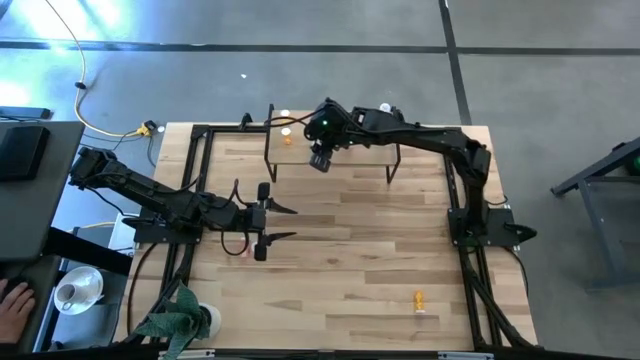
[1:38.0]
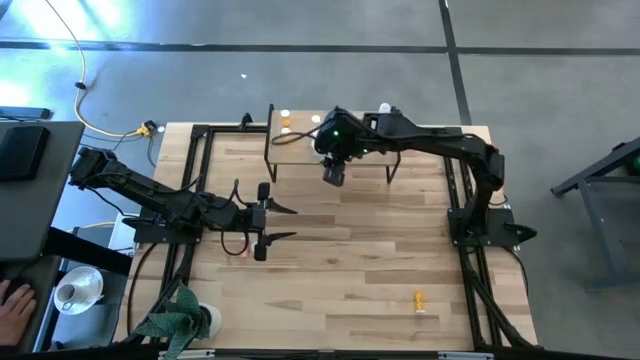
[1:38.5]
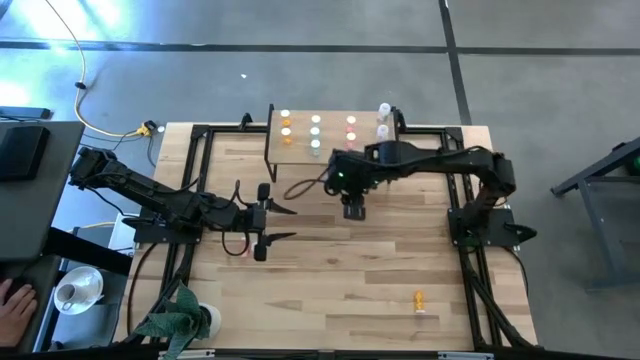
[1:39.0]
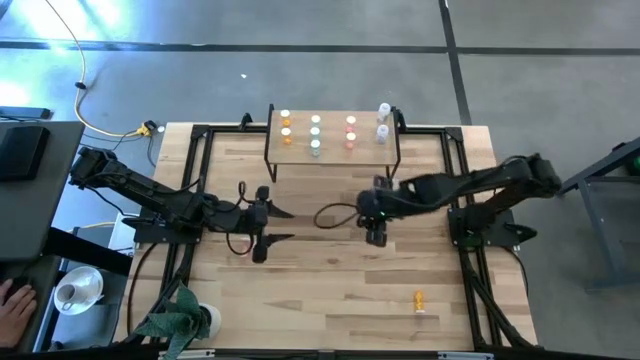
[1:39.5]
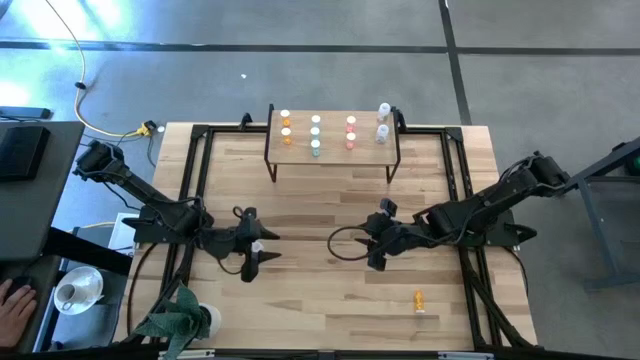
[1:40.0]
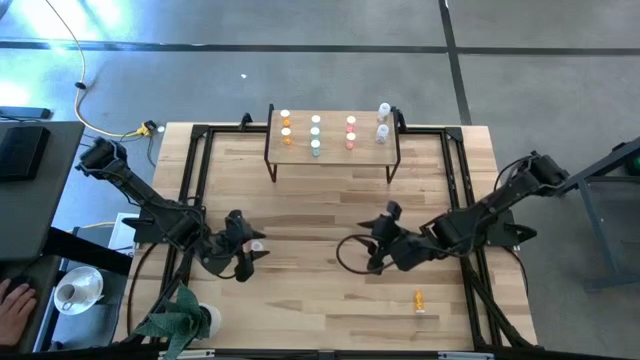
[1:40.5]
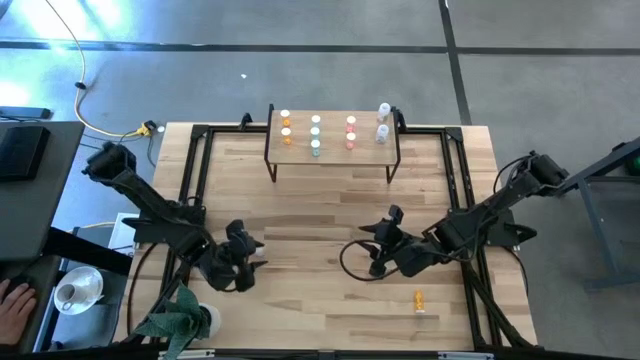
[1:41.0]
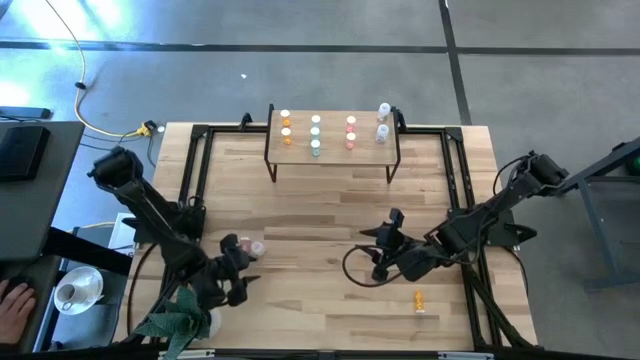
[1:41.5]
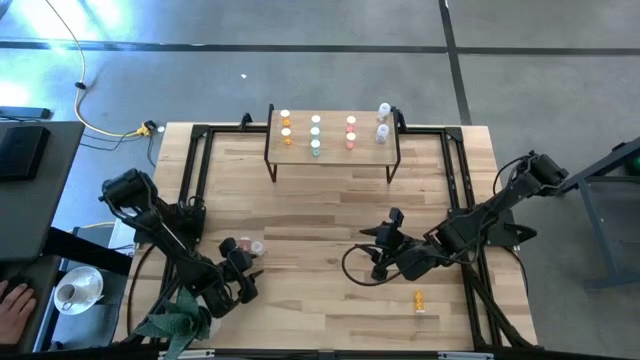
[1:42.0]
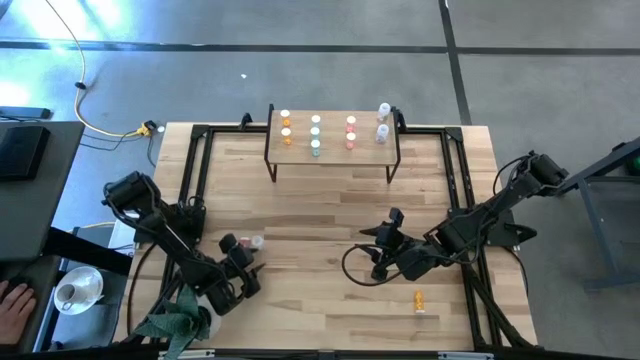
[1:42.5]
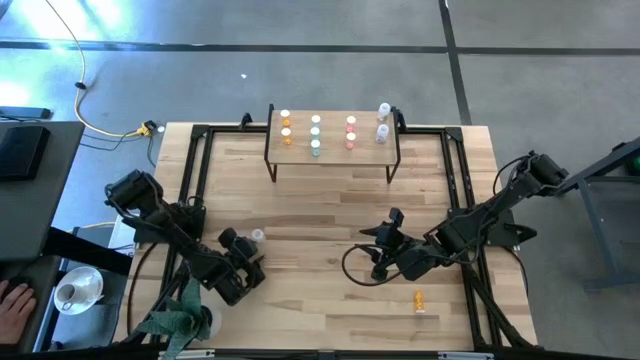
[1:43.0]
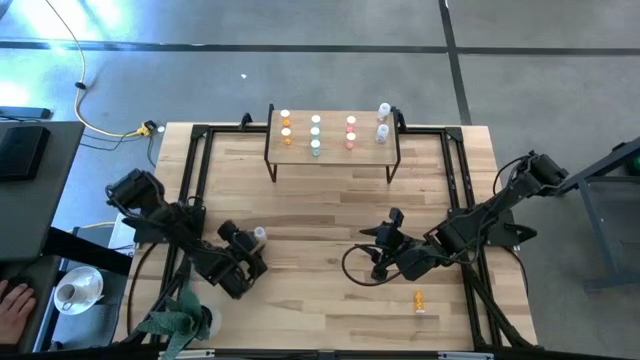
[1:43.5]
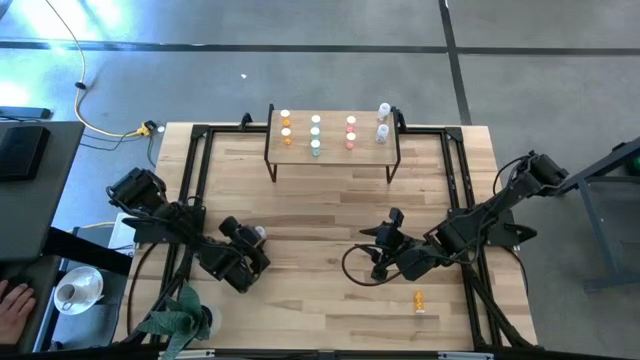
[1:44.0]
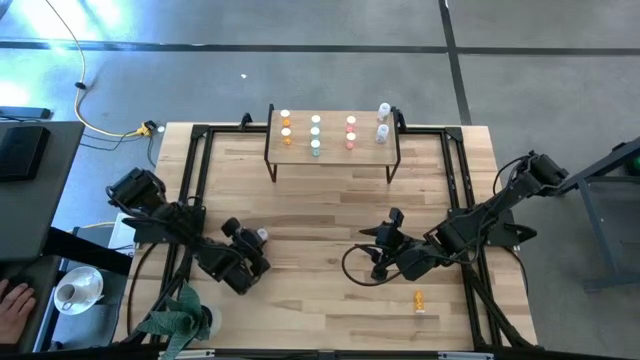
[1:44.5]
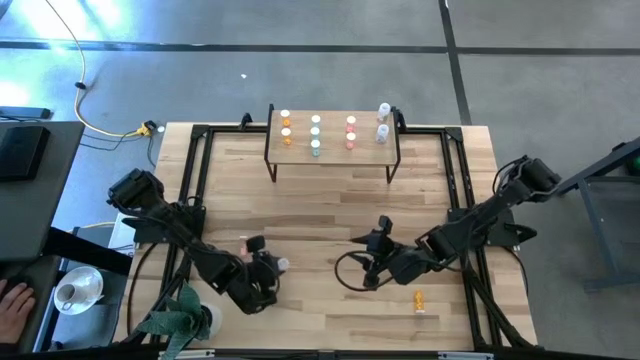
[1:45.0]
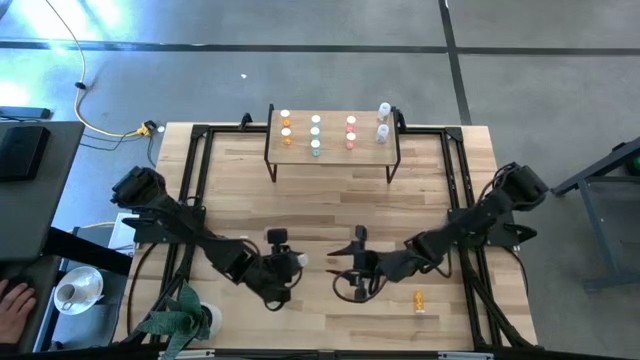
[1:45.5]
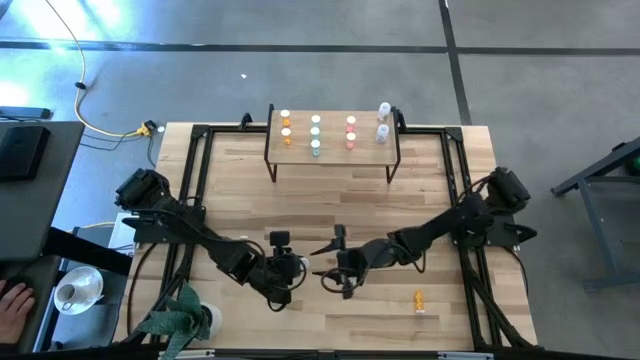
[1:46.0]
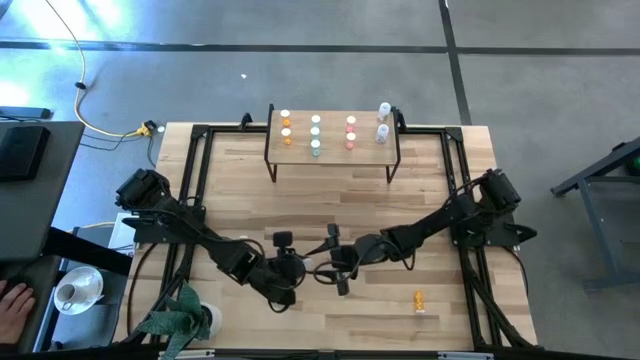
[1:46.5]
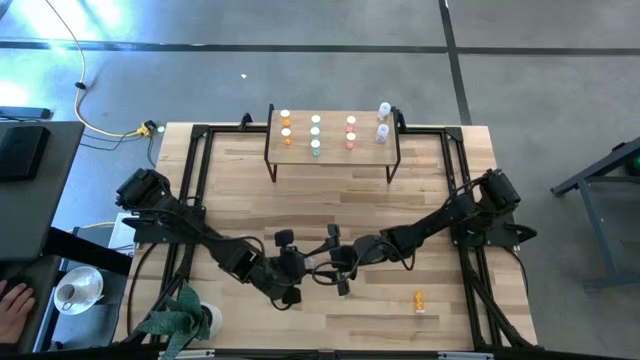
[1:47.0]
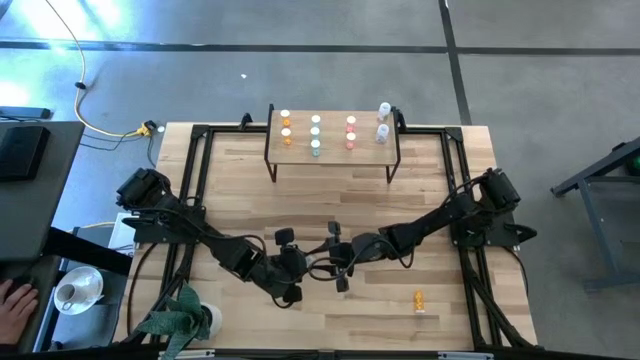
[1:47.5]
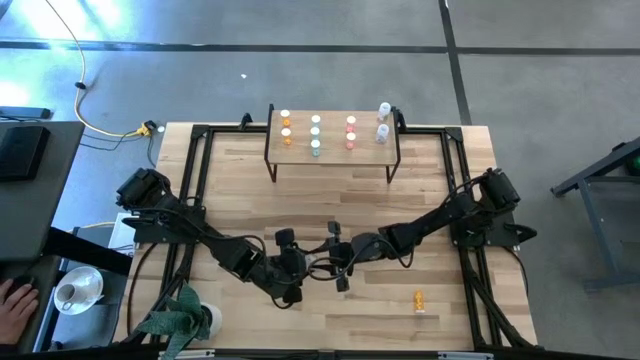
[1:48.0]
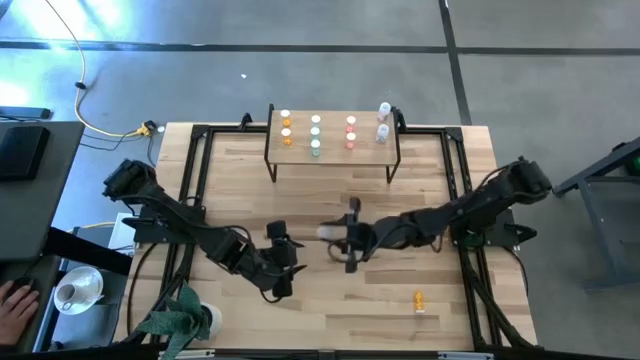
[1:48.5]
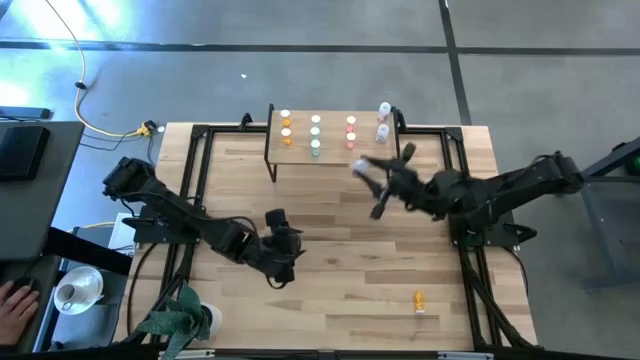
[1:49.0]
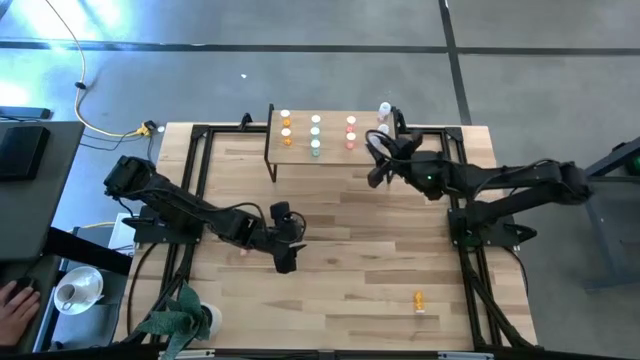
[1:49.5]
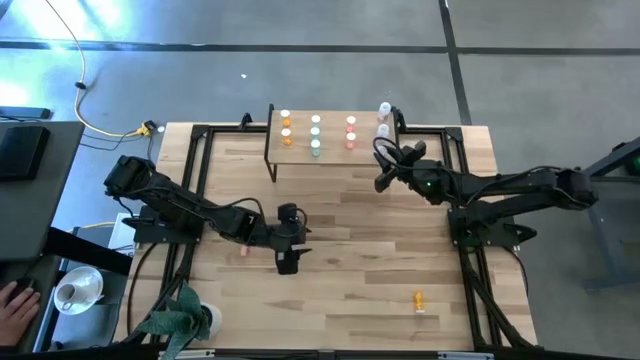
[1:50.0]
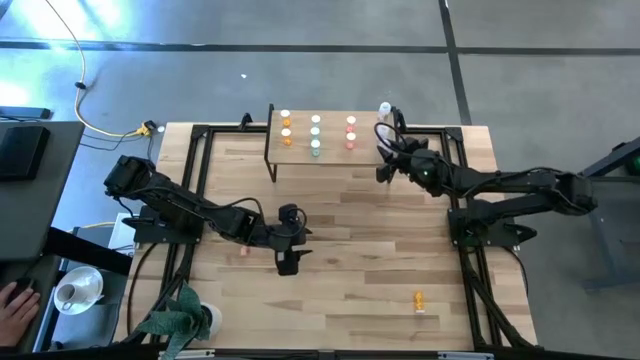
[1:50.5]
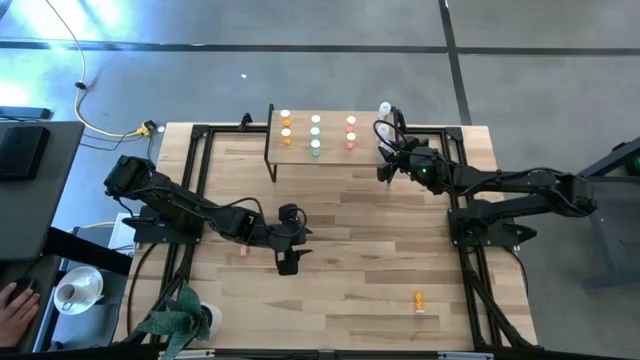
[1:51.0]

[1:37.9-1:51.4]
Task: Pick and place medicine bottles onto shelf by color
Put the white pill bottle on the shelf

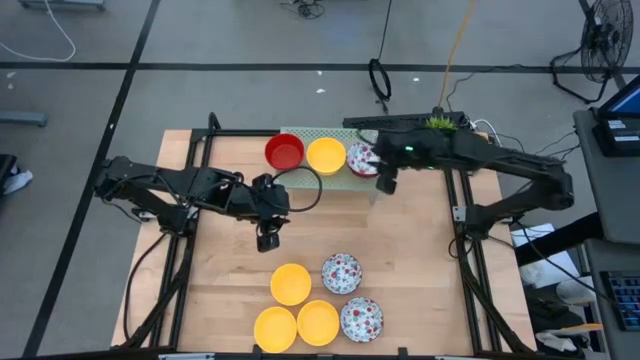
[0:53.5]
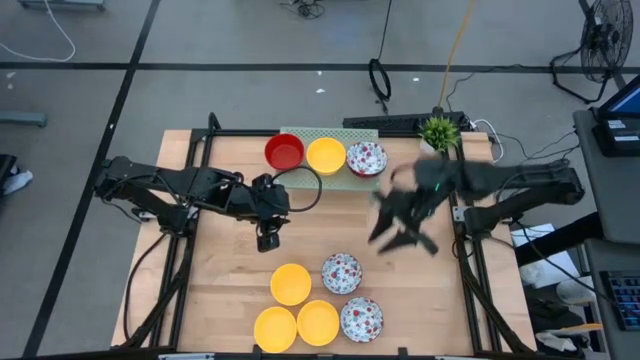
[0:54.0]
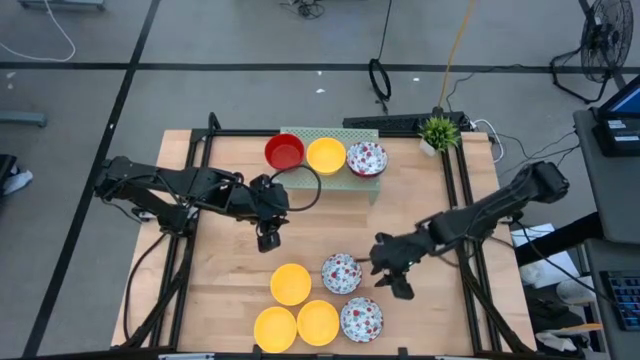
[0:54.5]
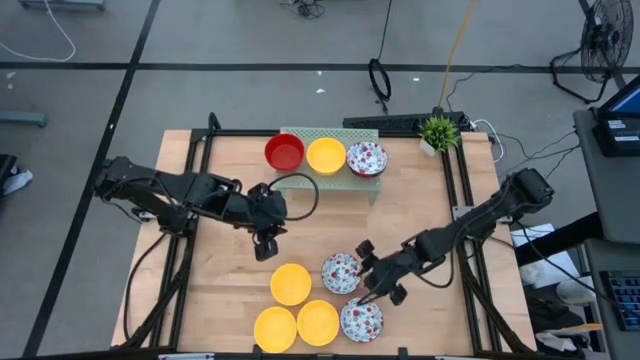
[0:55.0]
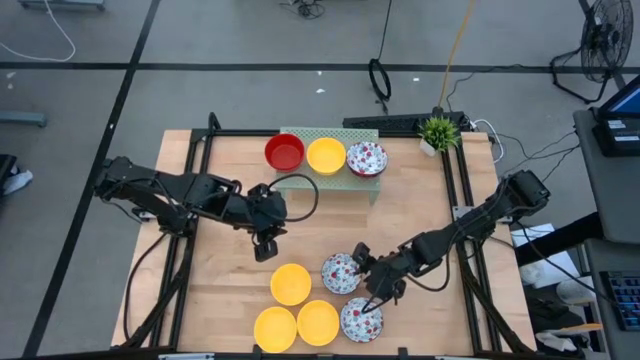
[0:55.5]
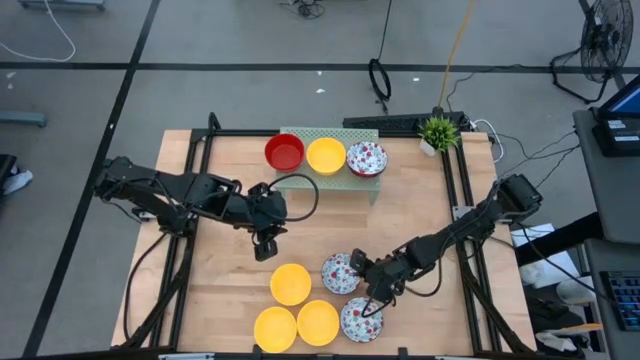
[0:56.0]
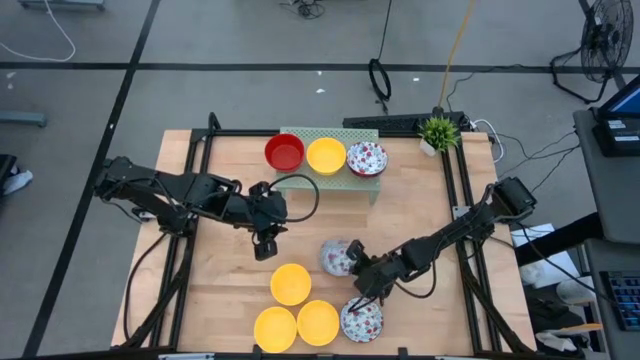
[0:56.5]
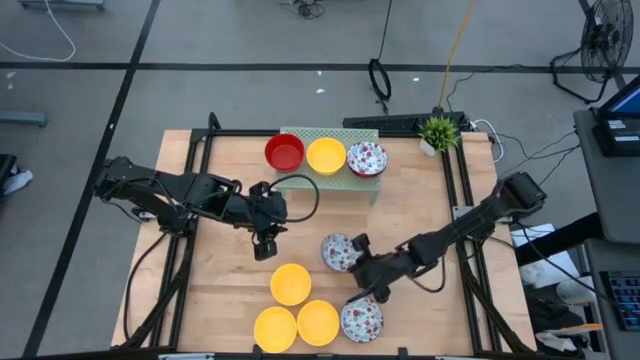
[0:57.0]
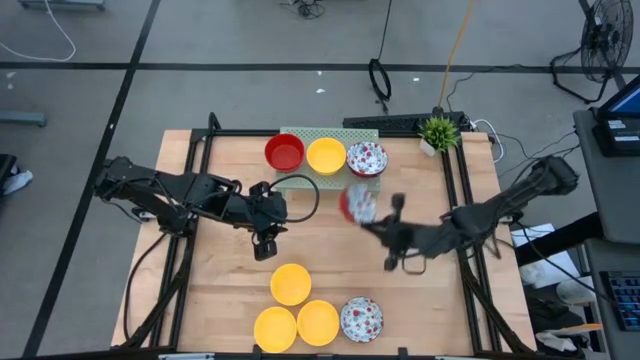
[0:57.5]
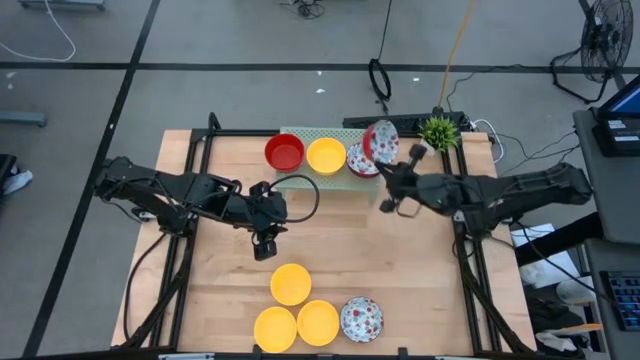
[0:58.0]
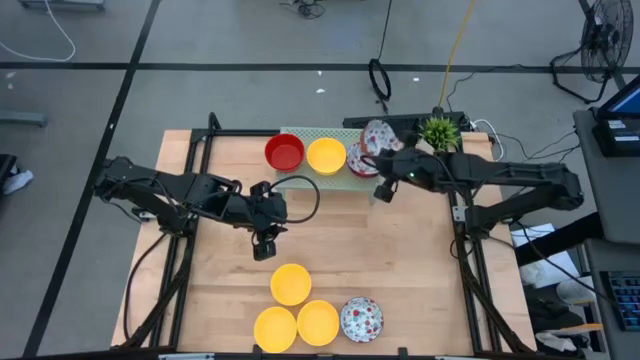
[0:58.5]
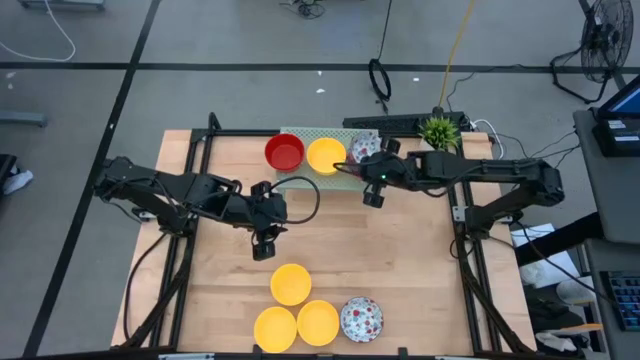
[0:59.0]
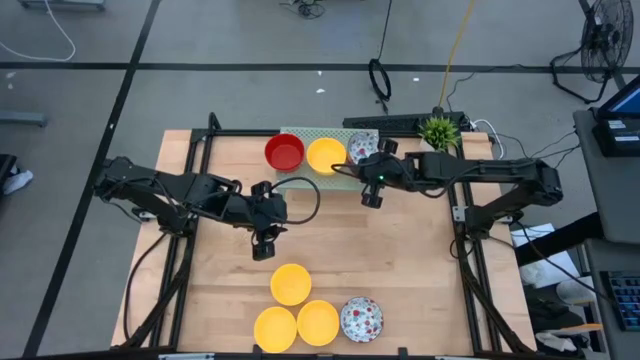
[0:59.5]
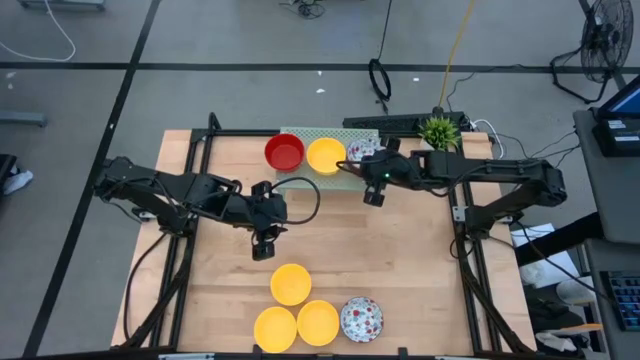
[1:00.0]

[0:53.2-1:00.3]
Task: Pick & Place Mini bowls
Stack the white patterned bowl on the white patterned bowl on the shelf
